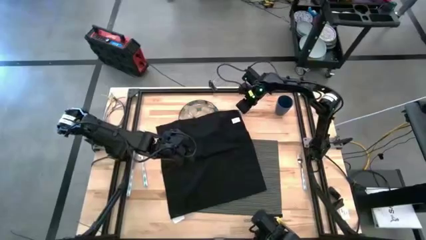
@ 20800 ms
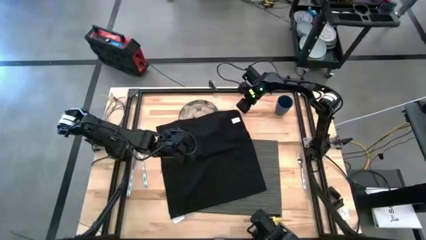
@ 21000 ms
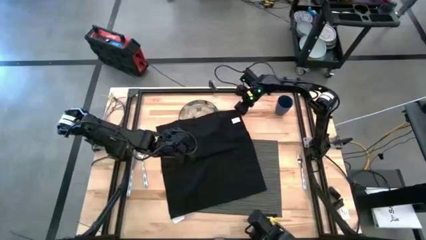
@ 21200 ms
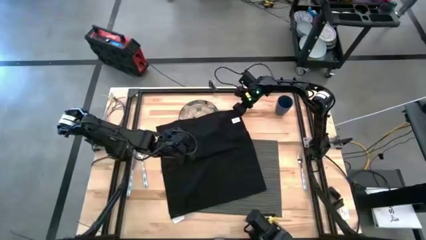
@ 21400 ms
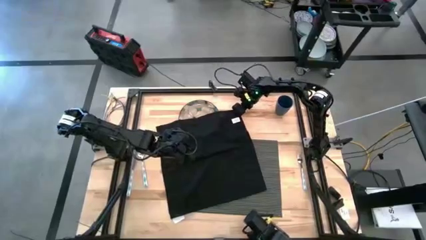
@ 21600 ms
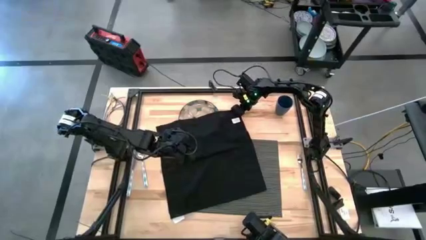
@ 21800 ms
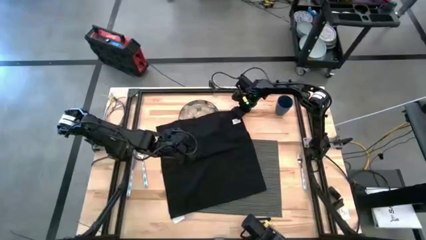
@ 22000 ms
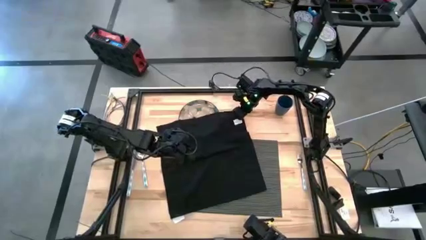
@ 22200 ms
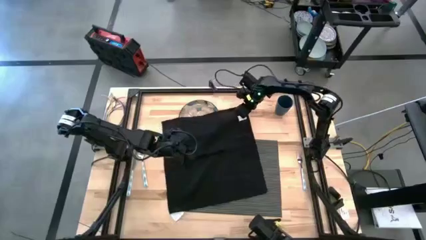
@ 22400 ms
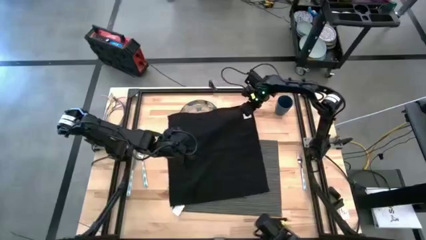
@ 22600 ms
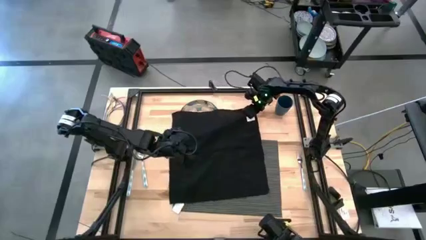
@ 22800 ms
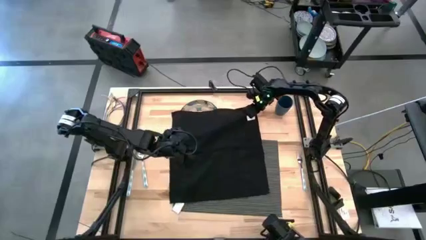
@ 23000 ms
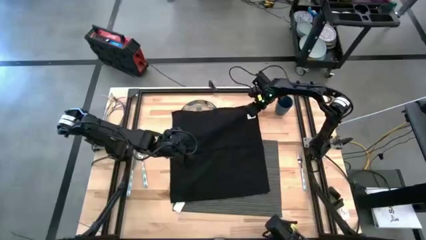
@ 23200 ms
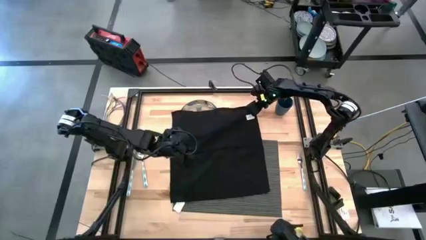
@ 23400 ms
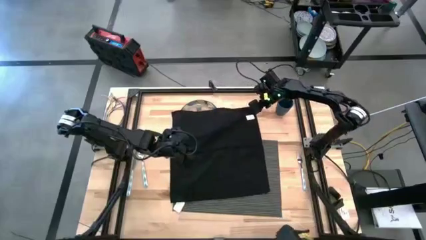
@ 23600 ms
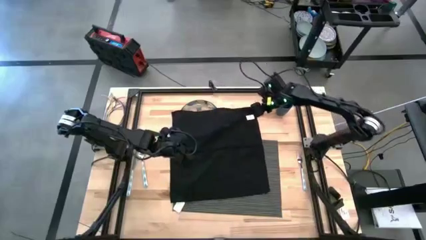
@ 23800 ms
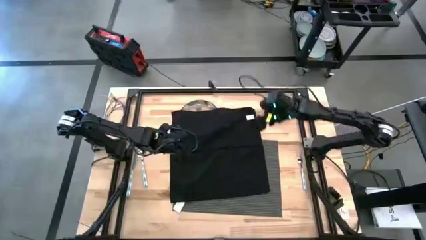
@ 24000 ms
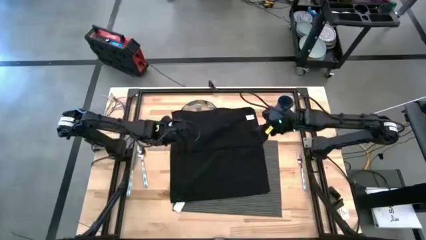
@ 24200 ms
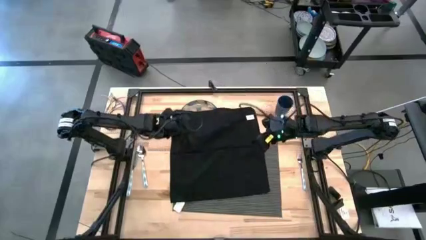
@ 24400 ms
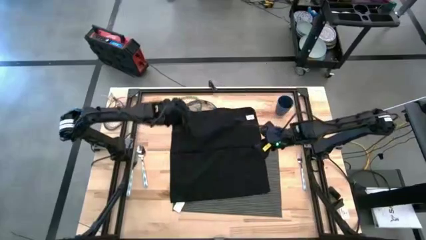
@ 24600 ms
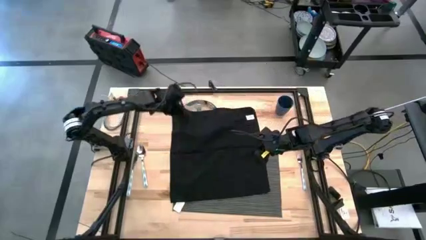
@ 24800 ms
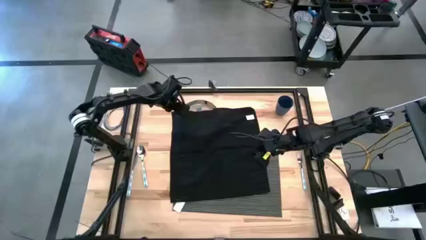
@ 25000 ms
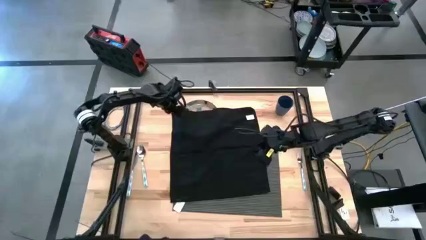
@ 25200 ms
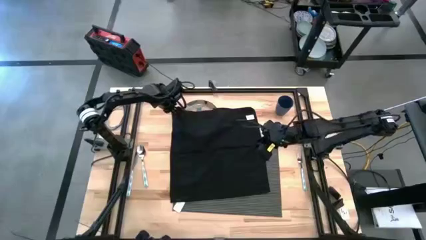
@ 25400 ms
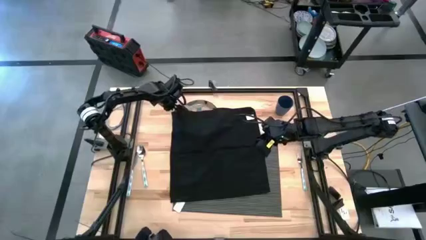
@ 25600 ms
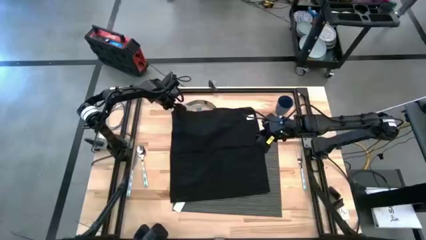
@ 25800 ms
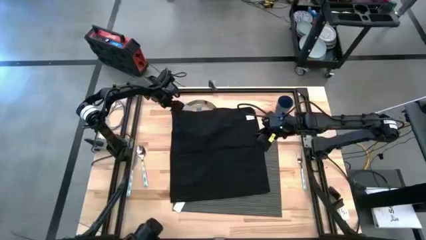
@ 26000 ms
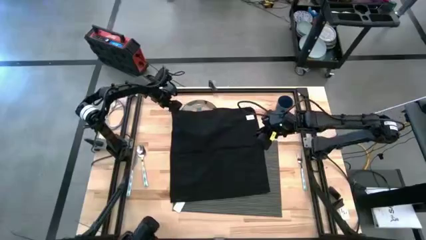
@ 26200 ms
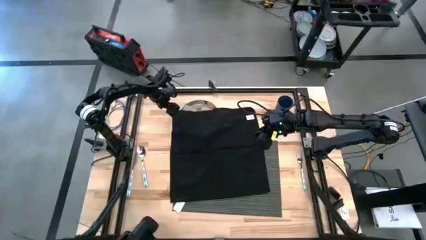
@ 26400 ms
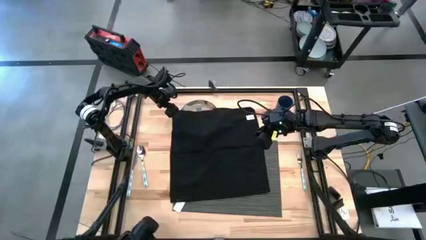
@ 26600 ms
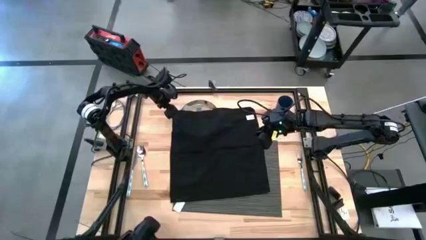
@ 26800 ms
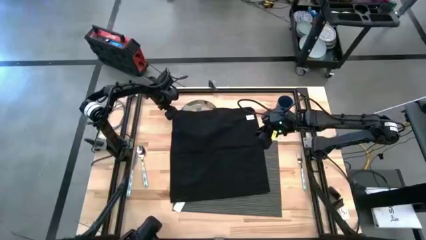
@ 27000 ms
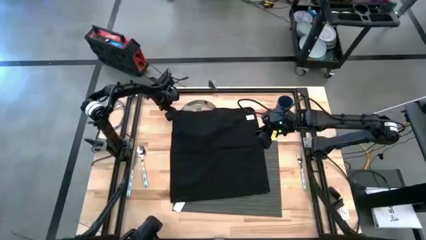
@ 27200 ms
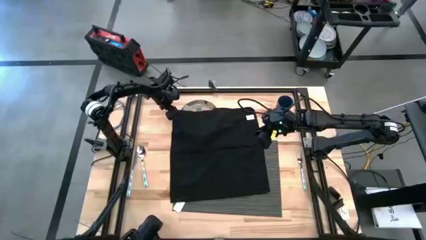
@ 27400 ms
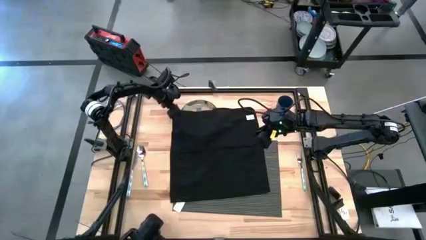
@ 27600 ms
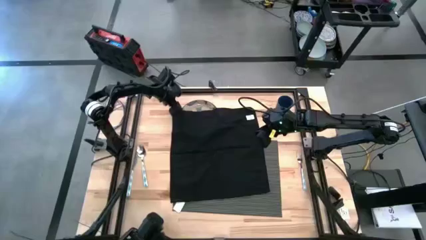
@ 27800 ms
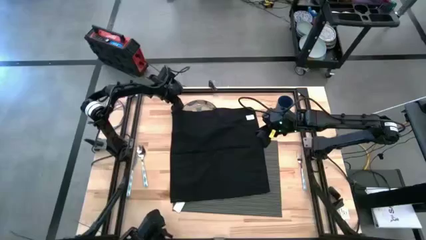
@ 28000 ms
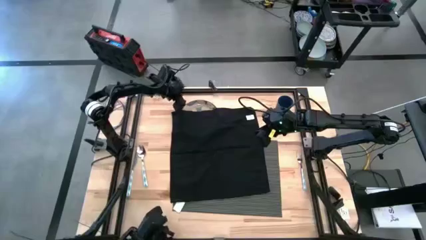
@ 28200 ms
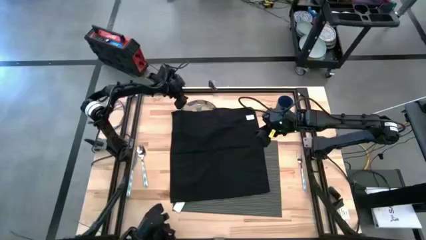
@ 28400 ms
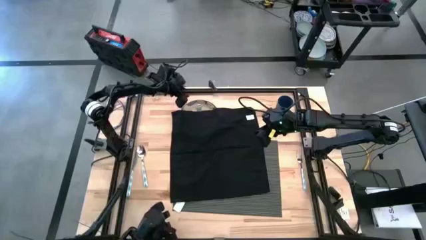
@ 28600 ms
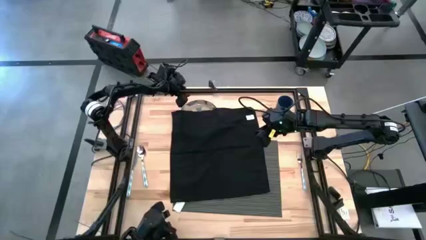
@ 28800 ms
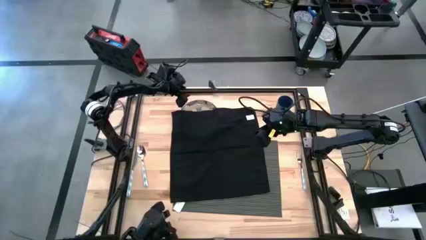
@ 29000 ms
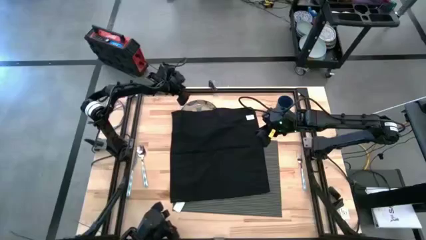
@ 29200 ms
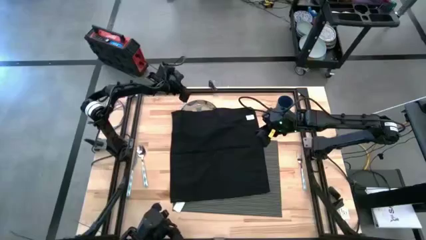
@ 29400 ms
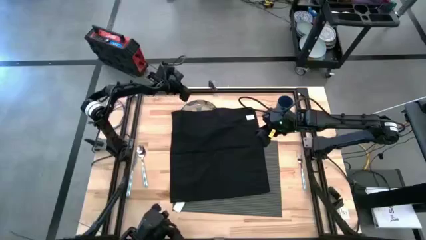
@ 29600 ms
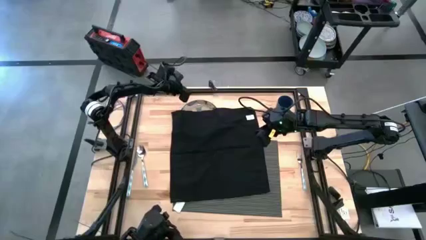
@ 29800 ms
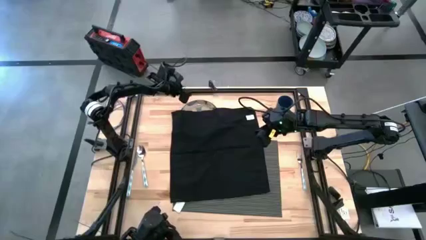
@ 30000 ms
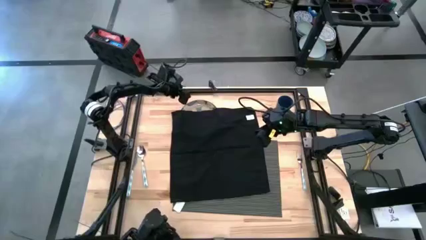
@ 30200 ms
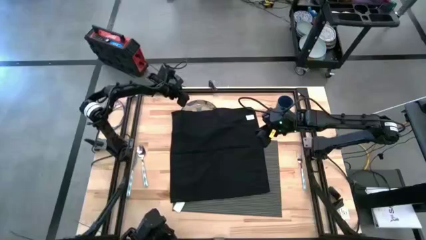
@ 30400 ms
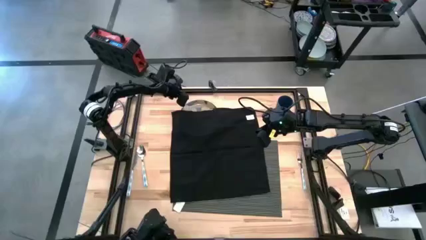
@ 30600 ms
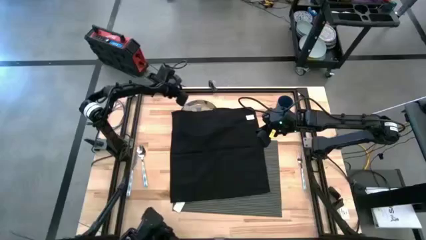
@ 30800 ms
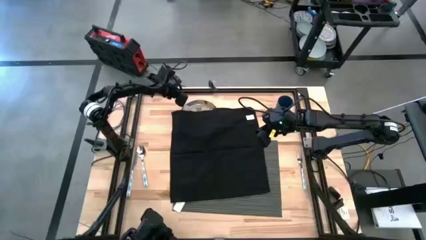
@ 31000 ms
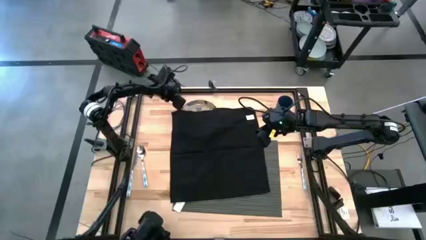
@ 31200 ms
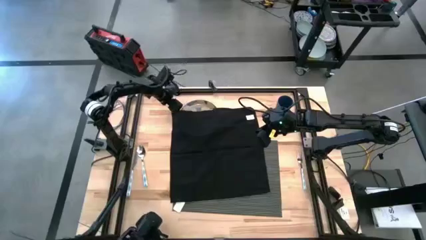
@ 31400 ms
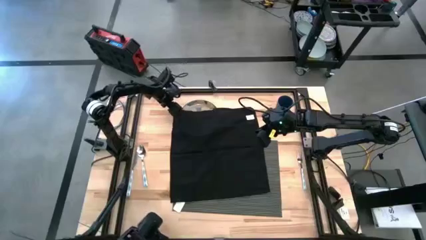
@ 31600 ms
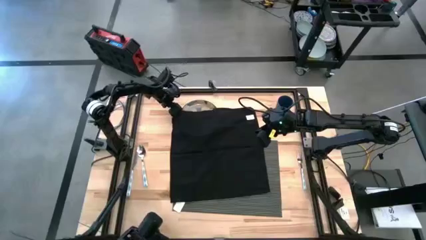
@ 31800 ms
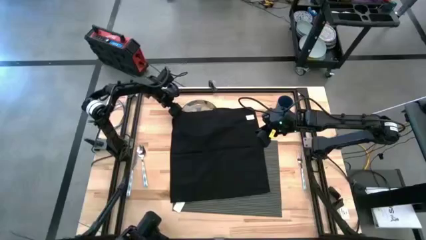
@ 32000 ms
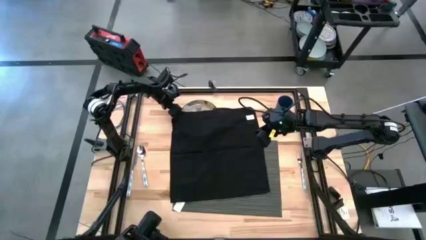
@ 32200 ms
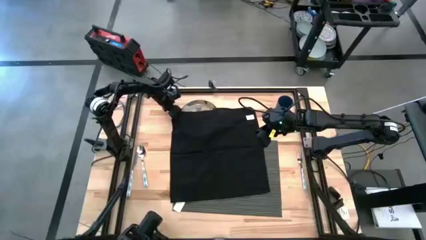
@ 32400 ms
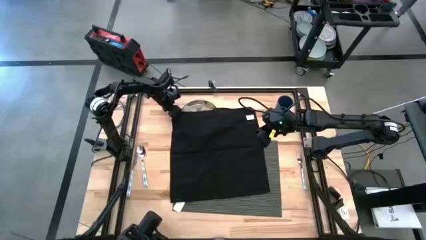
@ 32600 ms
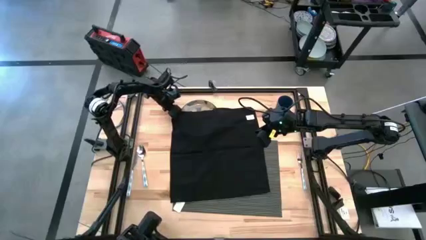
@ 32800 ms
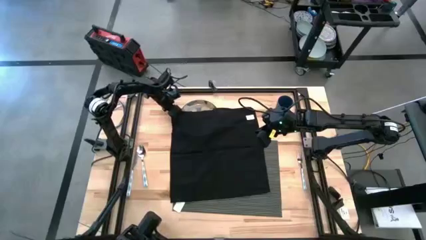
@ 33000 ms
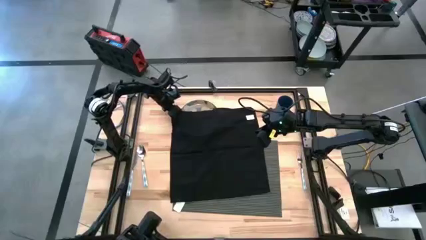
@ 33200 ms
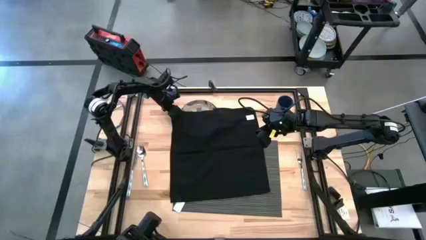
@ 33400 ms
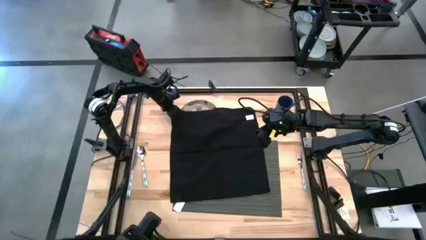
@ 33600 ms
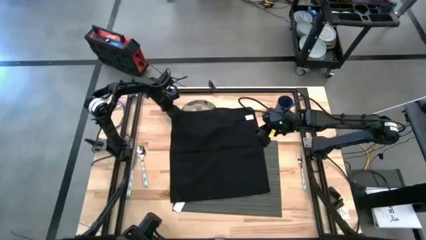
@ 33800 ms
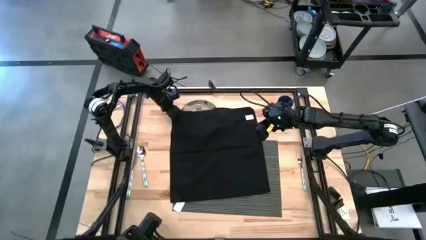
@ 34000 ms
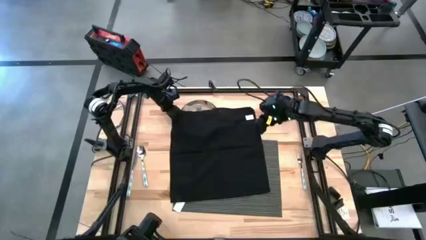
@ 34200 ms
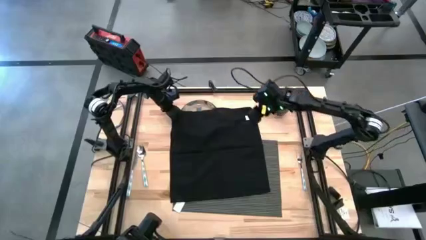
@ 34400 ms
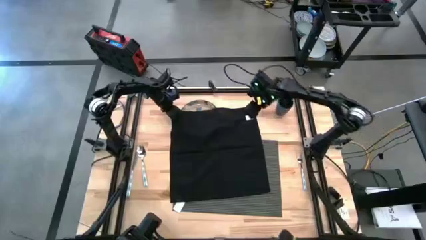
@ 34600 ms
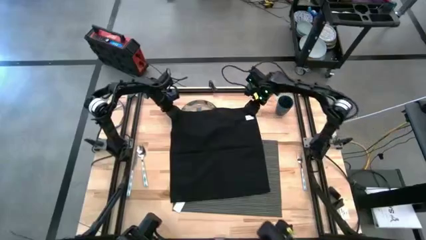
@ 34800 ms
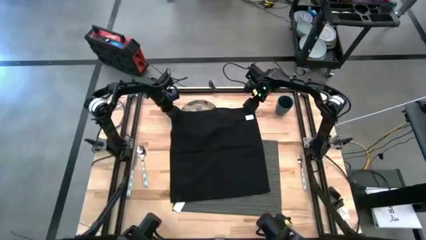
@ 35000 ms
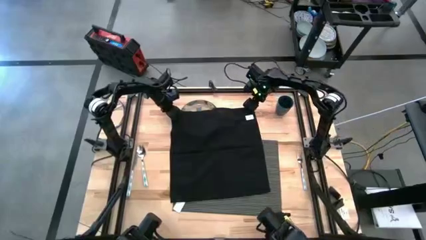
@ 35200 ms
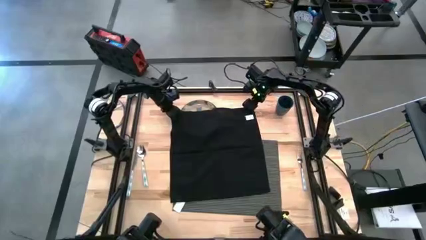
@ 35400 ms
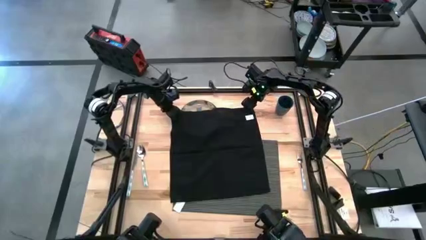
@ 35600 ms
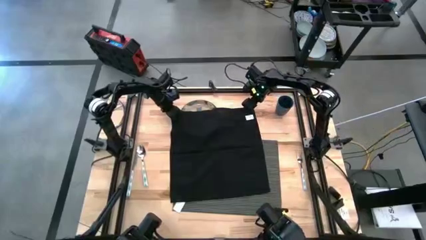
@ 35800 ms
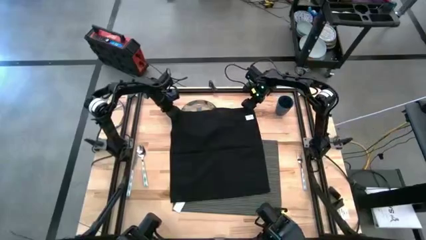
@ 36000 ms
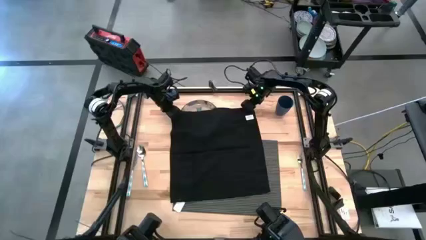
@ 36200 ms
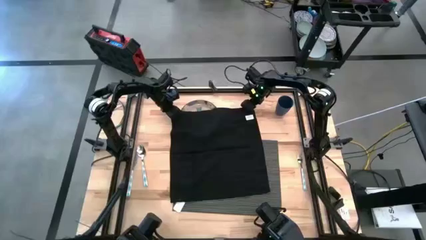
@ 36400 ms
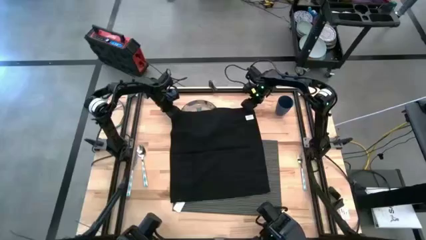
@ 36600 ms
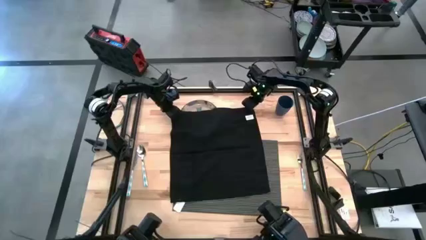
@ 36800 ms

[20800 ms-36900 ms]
Task: Set table place
Fold the black napkin
